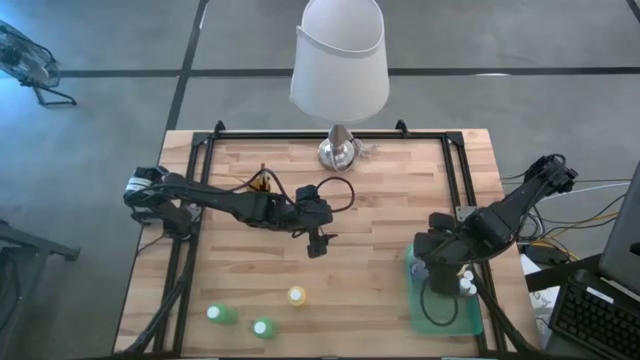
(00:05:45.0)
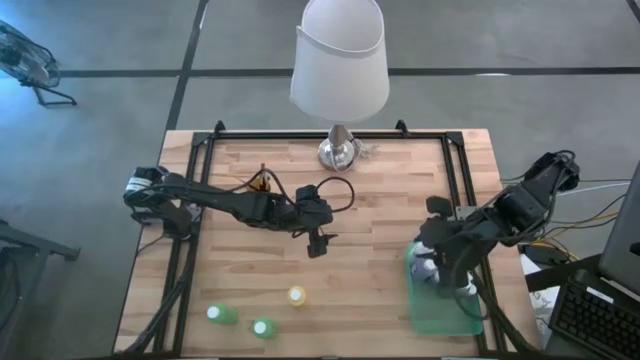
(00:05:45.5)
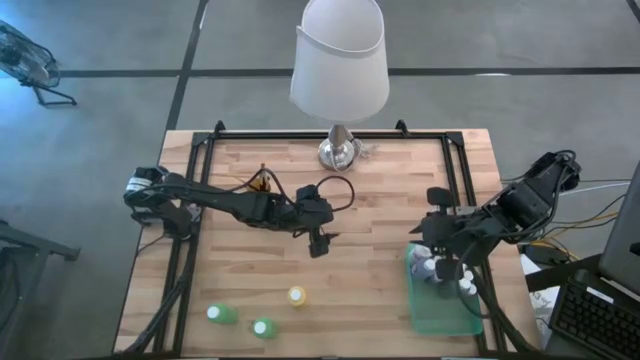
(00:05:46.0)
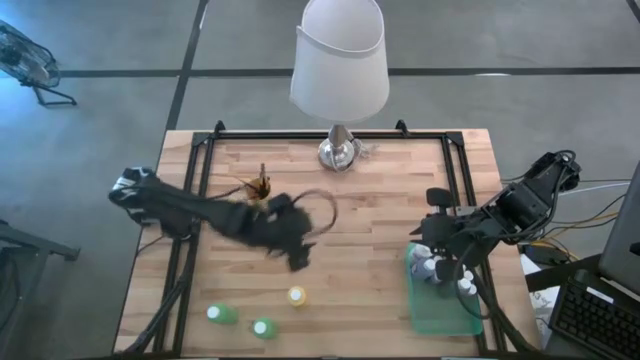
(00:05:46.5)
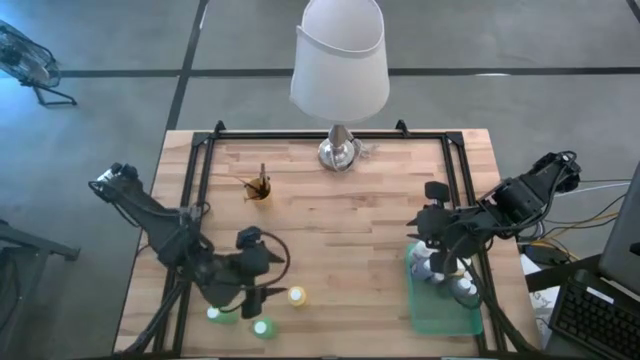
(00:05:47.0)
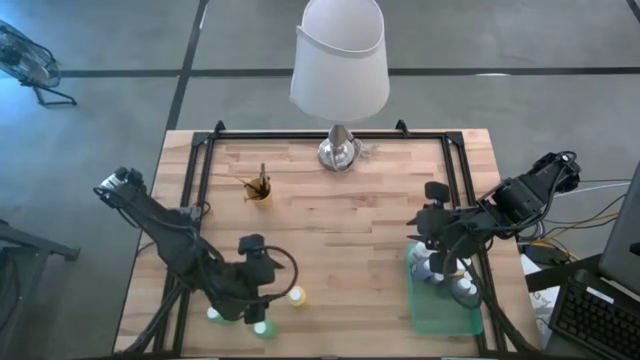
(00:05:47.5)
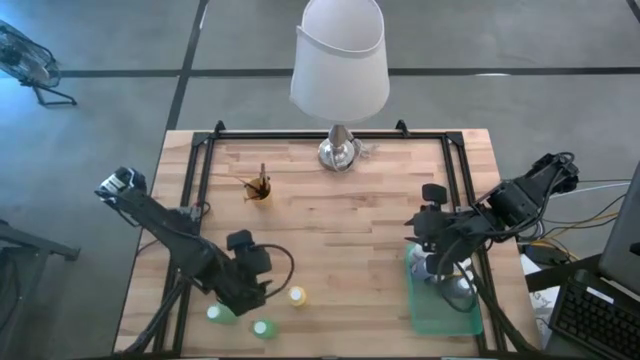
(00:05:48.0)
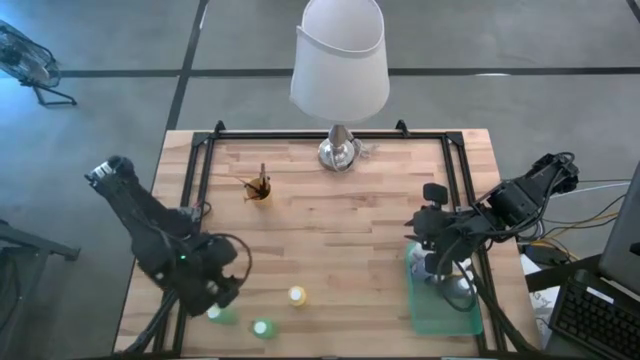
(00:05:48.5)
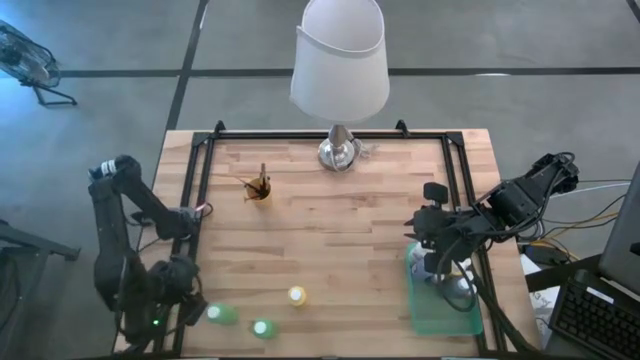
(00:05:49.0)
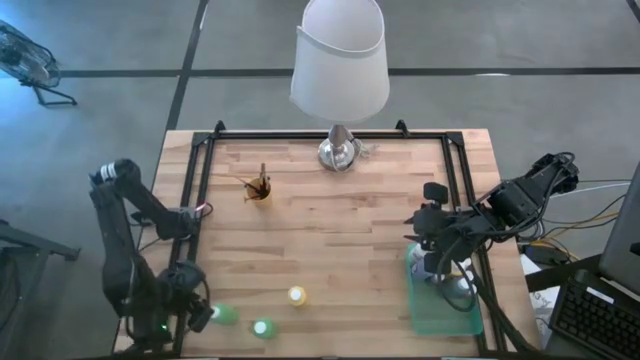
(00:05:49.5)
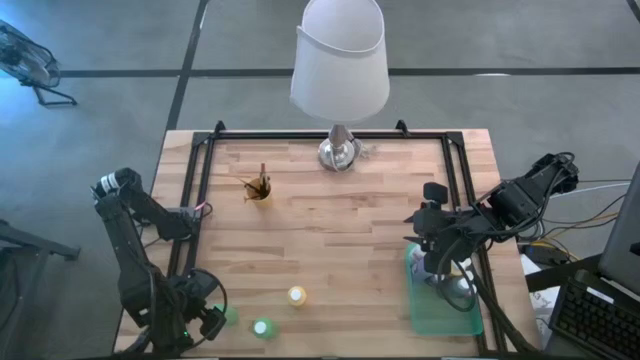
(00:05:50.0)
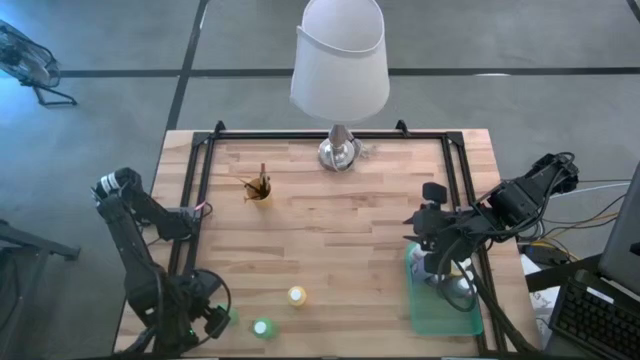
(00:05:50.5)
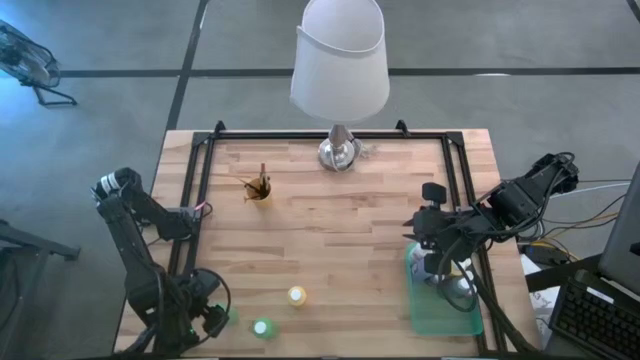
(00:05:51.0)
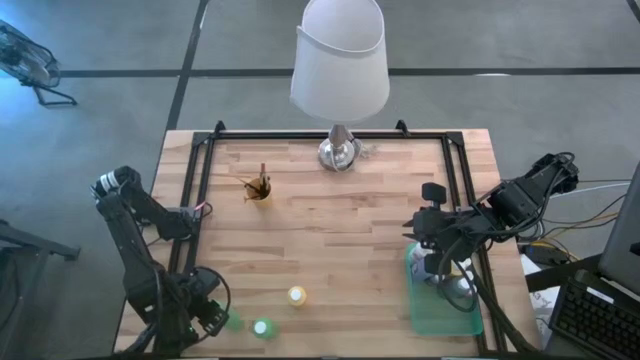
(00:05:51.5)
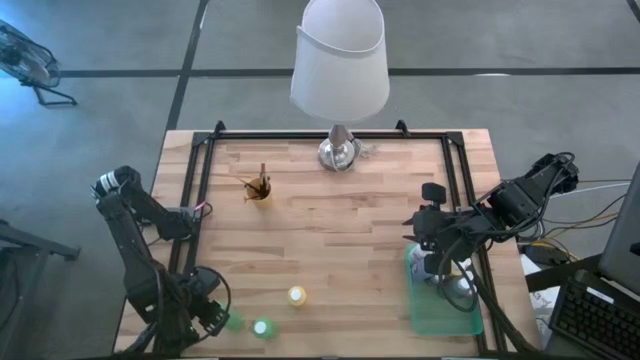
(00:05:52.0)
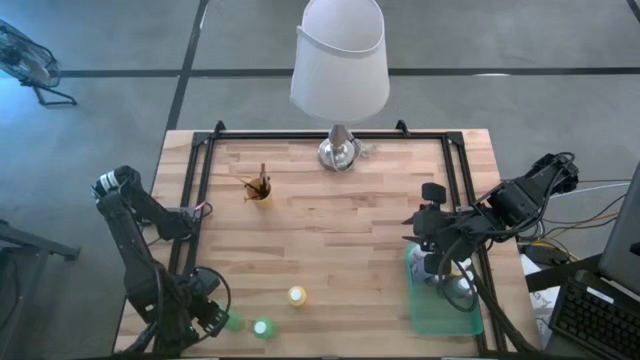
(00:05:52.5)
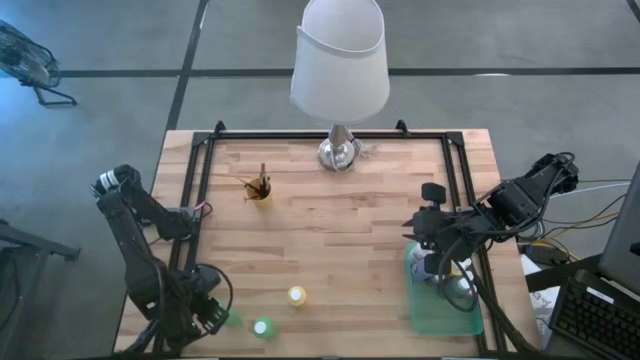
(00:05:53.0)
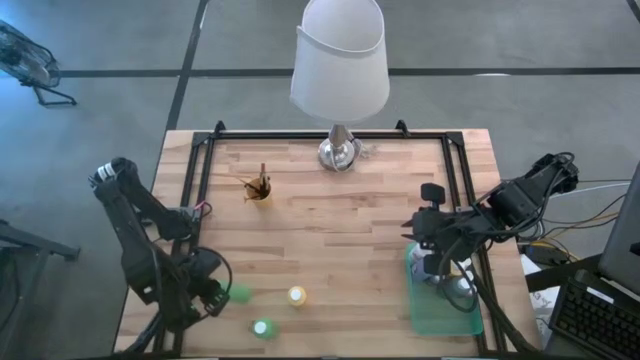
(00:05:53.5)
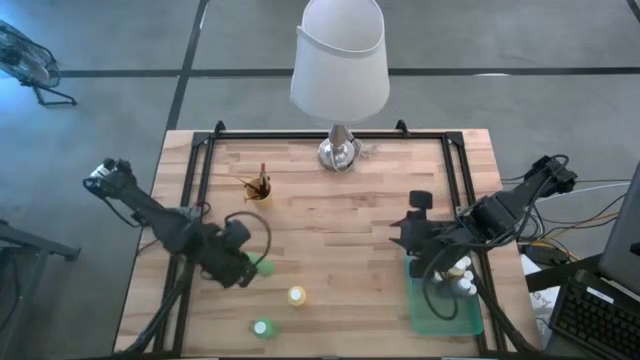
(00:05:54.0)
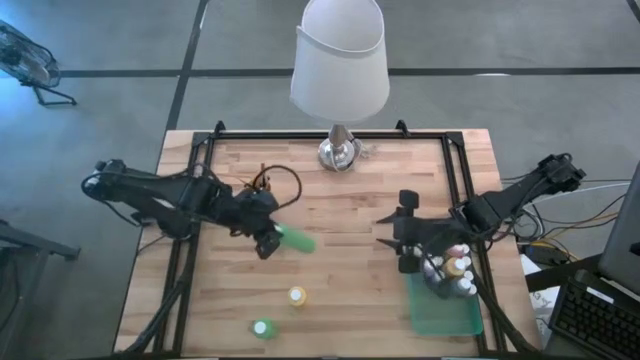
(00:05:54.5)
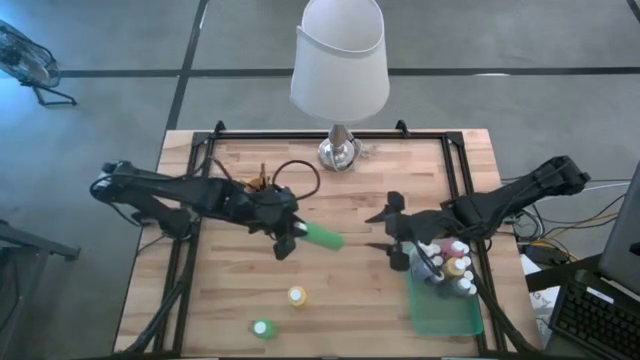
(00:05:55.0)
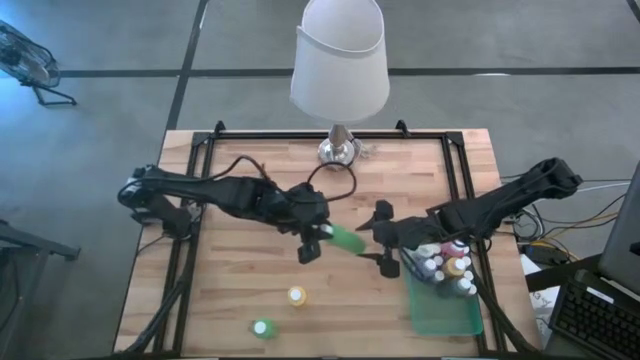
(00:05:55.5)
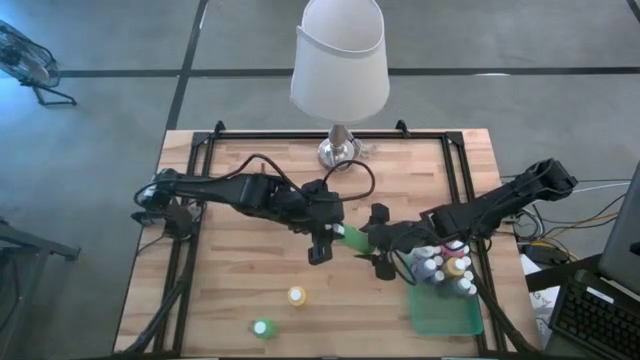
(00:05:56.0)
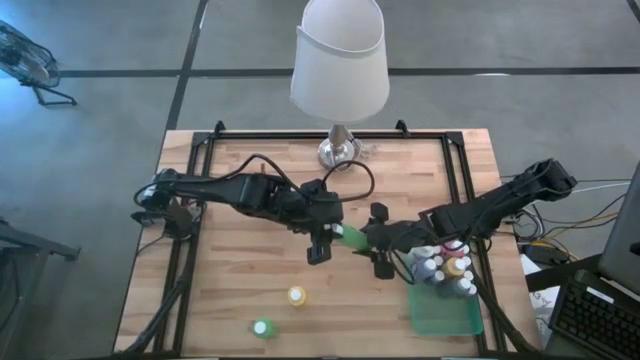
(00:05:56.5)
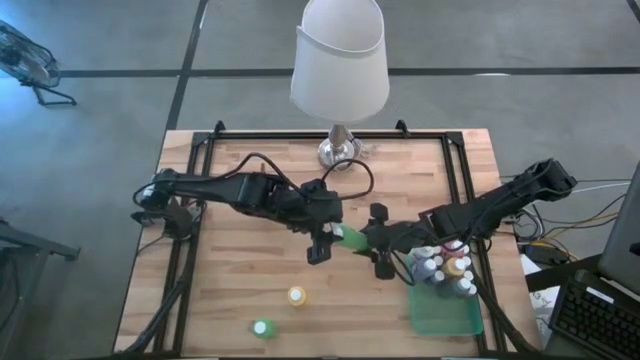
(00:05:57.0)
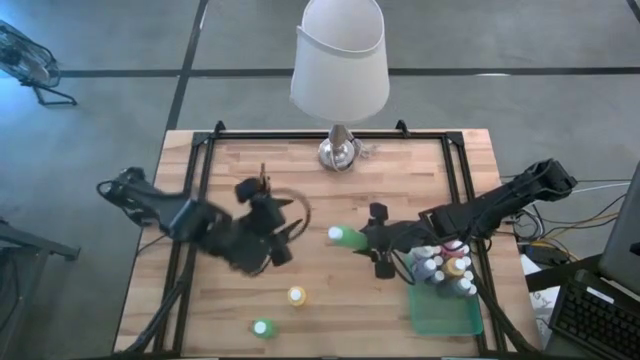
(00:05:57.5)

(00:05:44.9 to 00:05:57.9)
Task: Pick & Place Paint Supplies
Put the green paint bottle into the green bin
